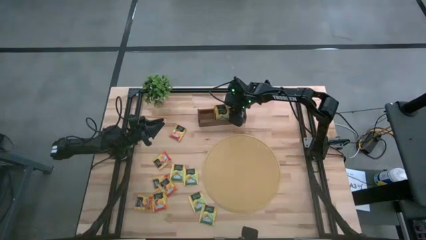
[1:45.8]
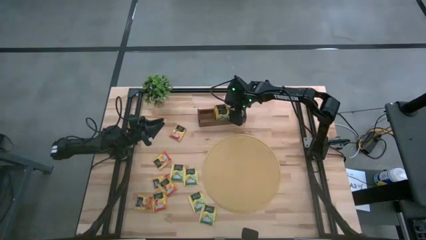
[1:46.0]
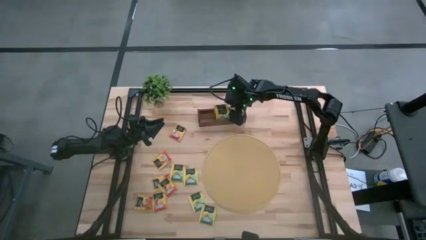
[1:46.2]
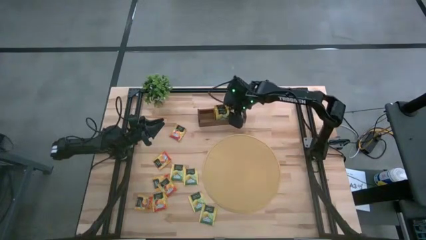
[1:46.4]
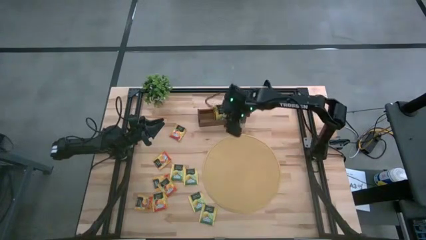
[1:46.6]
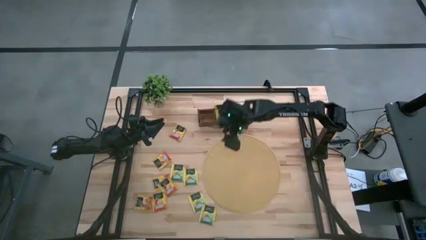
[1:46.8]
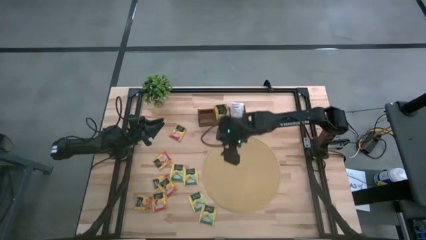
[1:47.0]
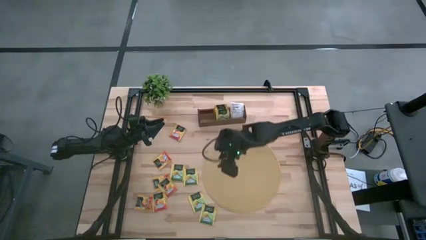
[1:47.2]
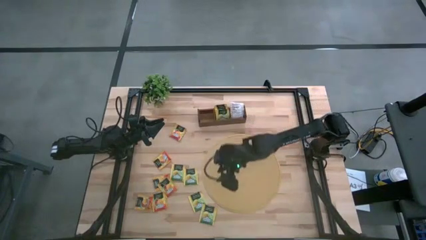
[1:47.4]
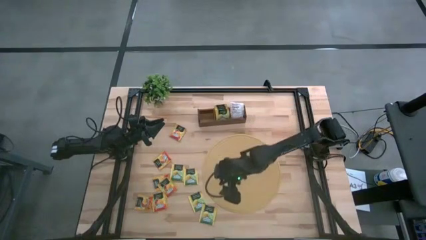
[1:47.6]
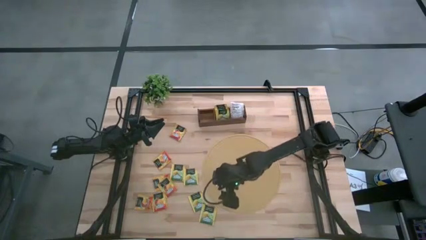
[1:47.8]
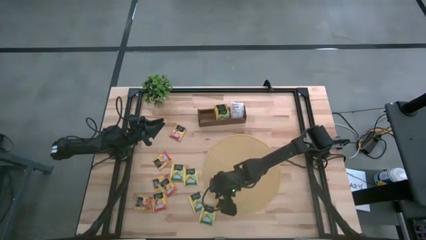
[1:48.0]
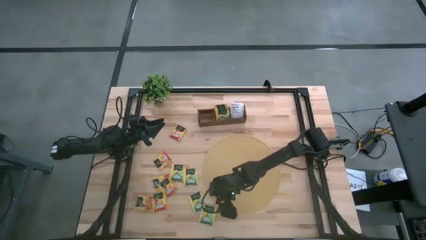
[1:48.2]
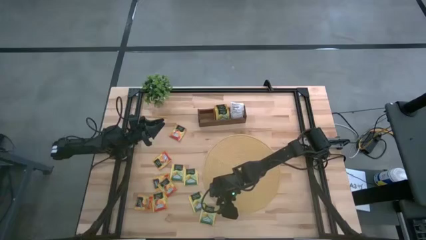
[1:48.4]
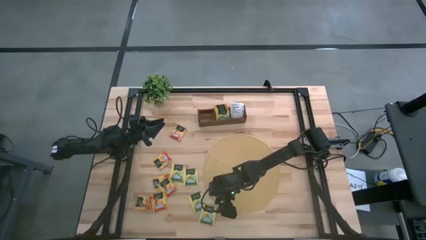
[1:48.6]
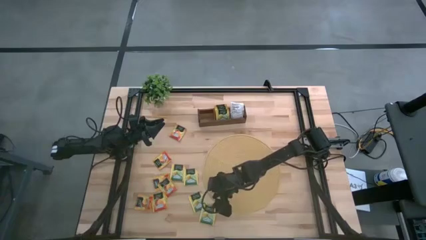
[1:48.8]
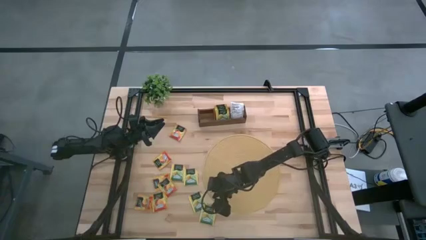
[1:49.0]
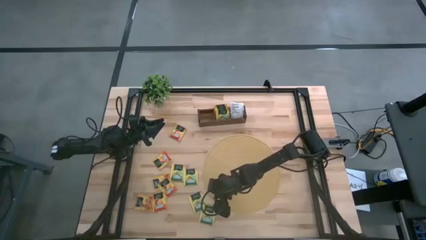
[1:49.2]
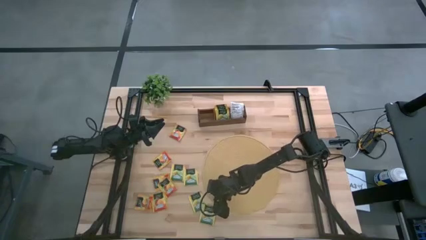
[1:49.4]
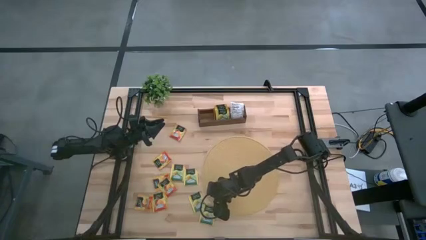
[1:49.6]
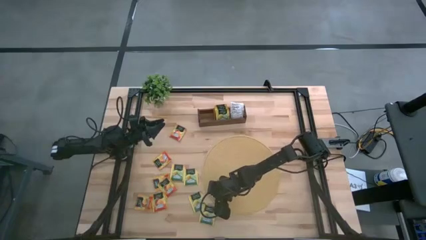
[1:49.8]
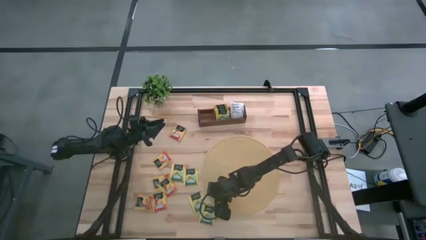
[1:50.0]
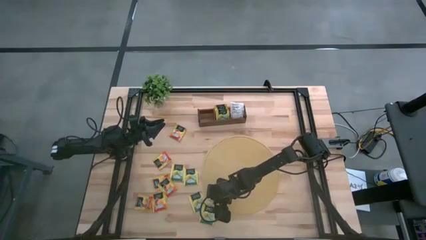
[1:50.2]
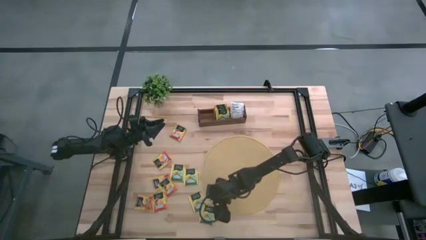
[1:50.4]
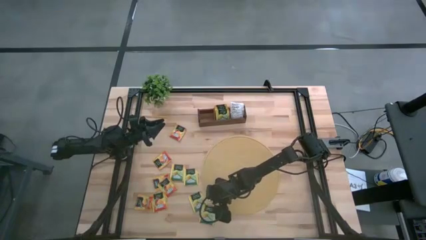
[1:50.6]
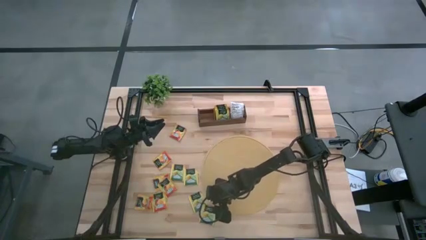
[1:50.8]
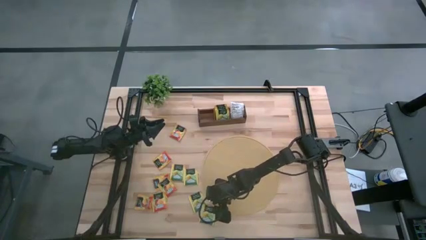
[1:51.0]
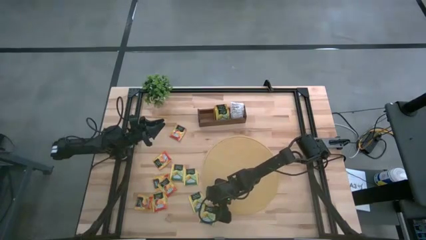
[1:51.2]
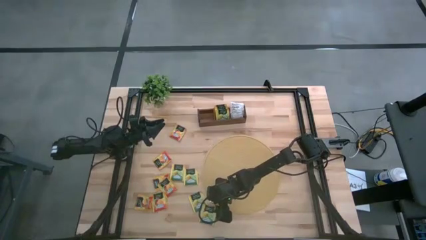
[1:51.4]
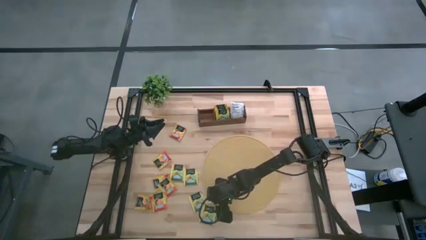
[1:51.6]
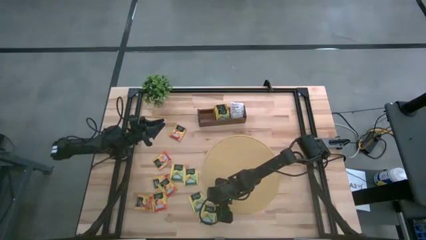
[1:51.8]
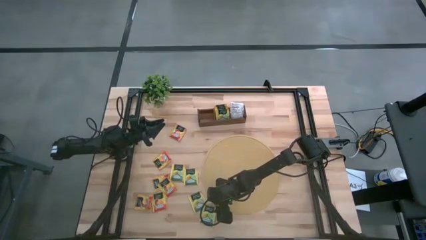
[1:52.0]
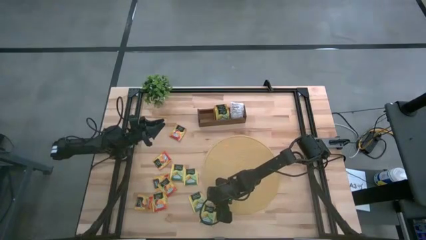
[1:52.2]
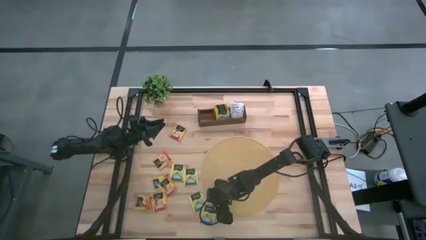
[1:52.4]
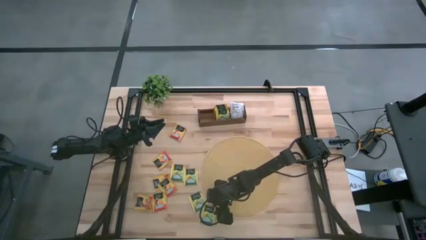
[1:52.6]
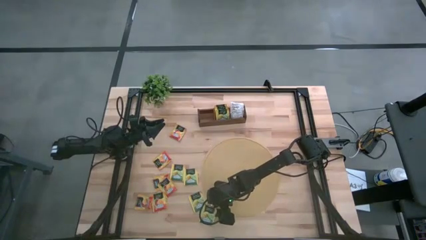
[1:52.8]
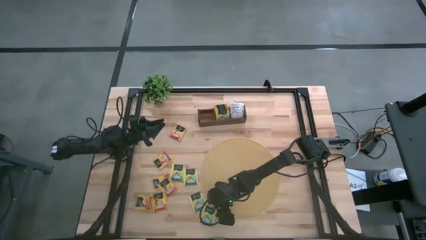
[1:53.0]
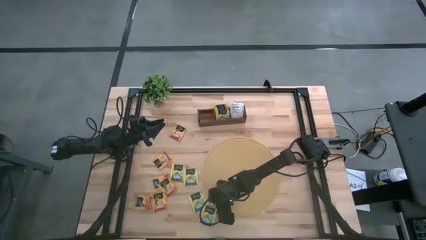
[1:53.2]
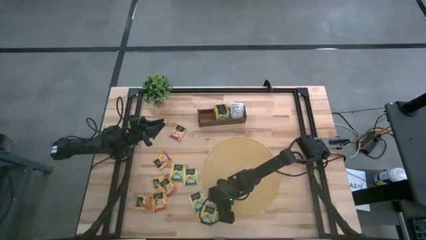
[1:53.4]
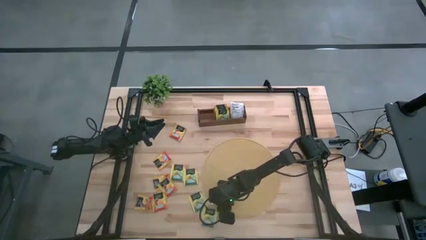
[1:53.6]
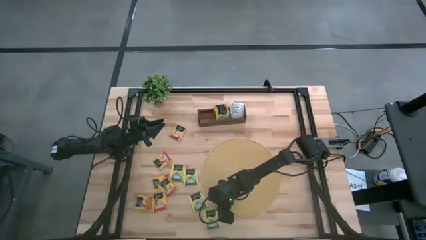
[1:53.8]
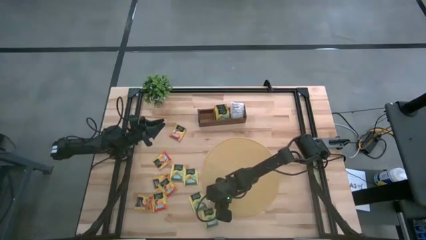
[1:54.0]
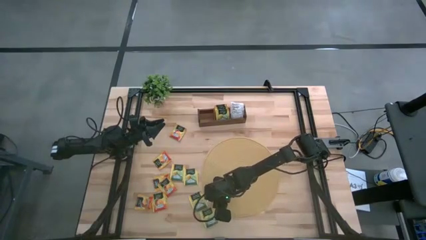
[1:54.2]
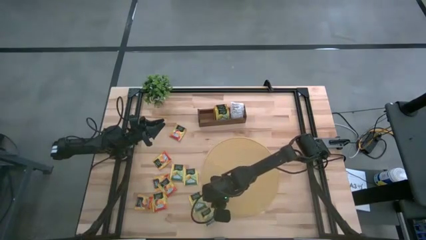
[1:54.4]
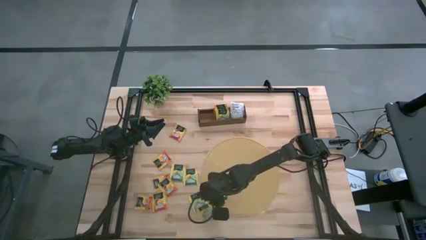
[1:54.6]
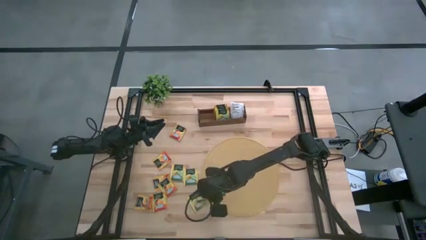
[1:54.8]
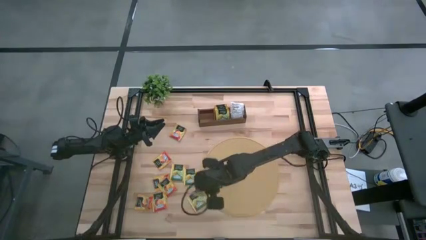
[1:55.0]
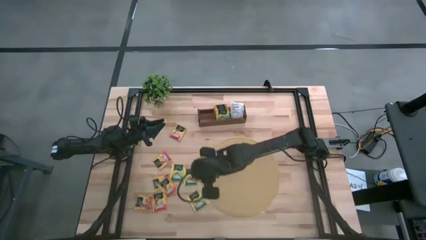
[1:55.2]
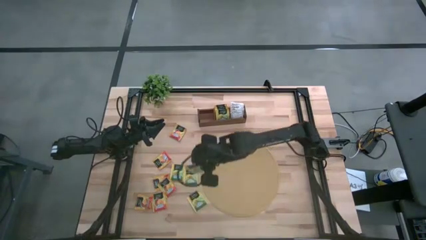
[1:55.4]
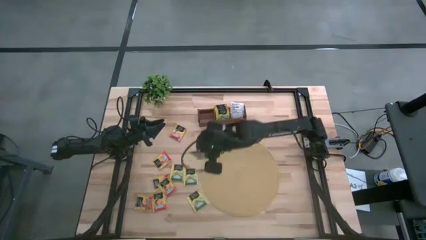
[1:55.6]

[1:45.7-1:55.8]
Task: Pick & Place Tea
Put the yellow tea bag into the middle section of the wooden organizer

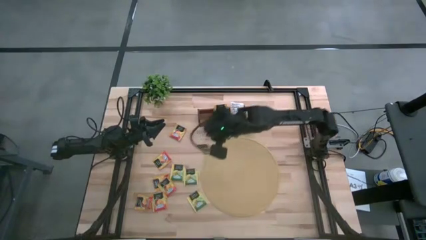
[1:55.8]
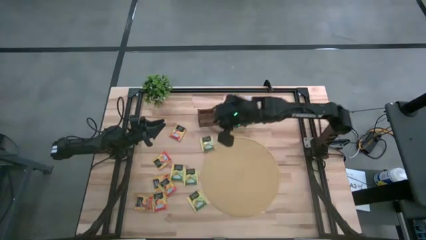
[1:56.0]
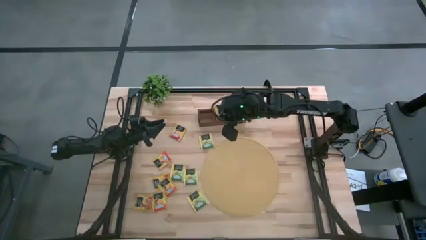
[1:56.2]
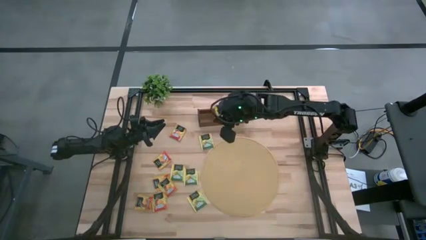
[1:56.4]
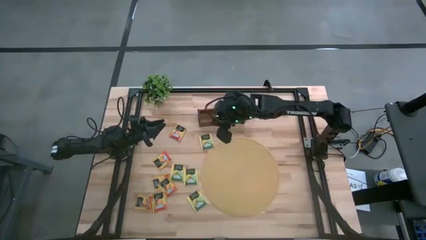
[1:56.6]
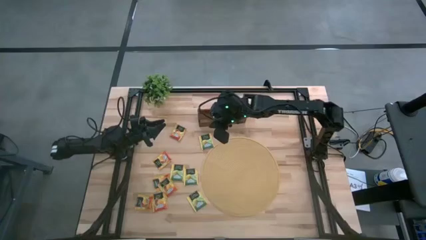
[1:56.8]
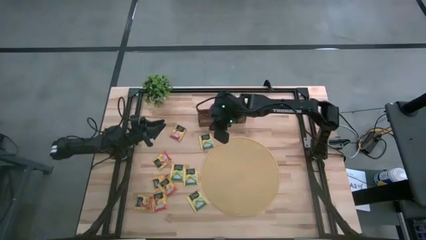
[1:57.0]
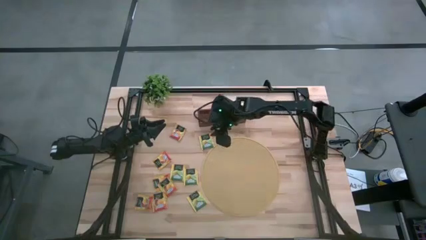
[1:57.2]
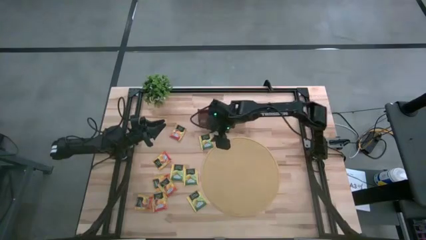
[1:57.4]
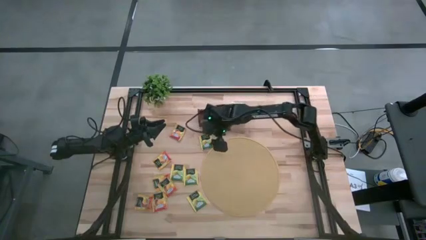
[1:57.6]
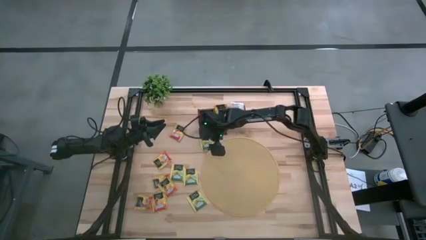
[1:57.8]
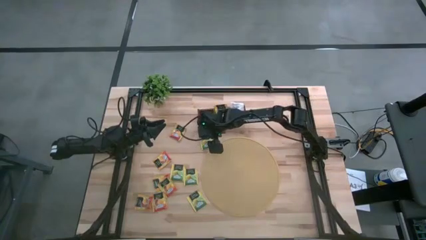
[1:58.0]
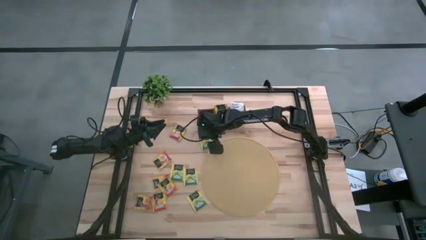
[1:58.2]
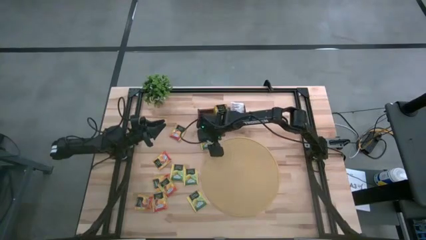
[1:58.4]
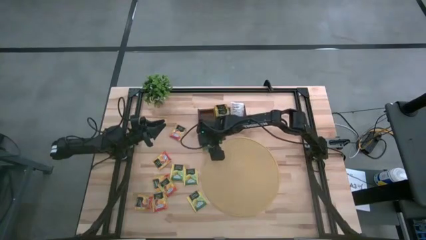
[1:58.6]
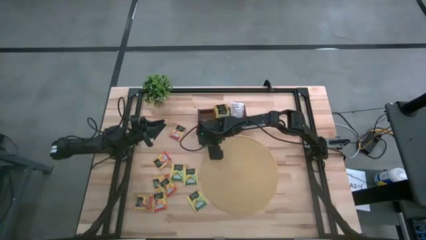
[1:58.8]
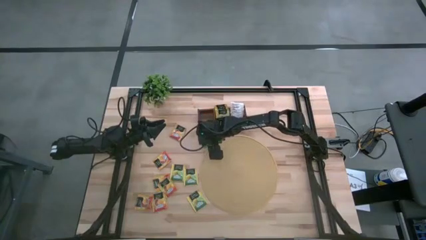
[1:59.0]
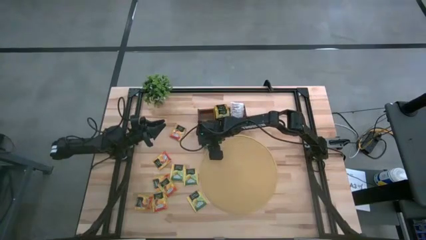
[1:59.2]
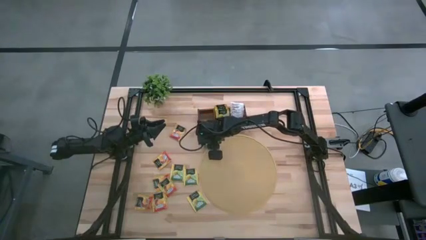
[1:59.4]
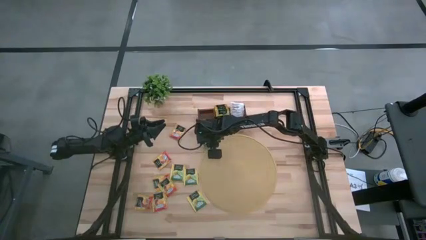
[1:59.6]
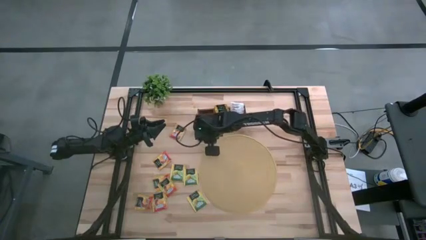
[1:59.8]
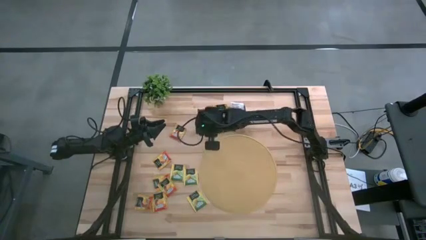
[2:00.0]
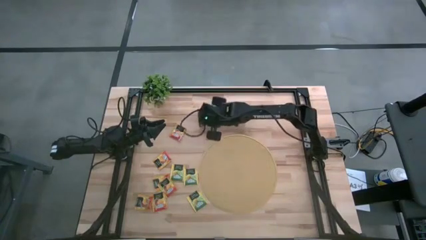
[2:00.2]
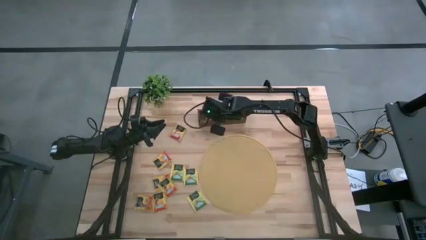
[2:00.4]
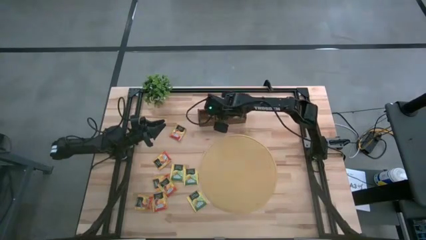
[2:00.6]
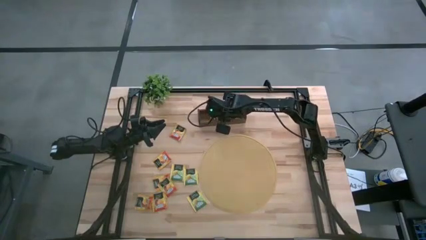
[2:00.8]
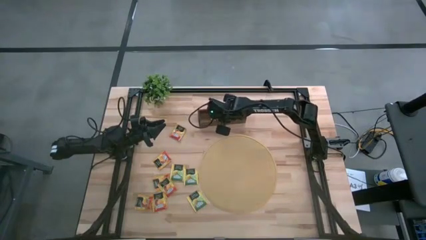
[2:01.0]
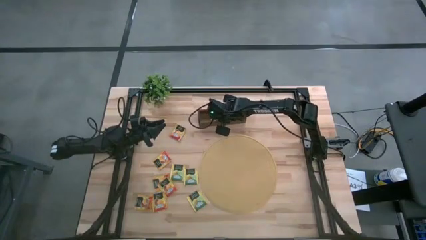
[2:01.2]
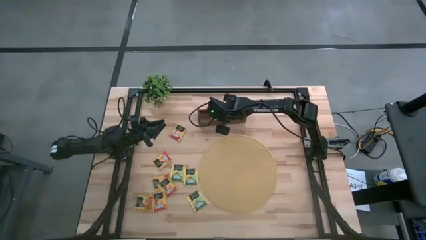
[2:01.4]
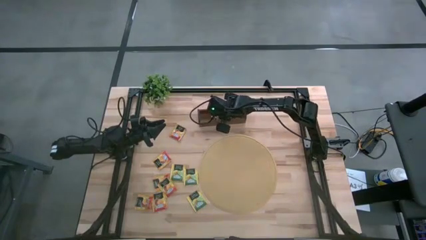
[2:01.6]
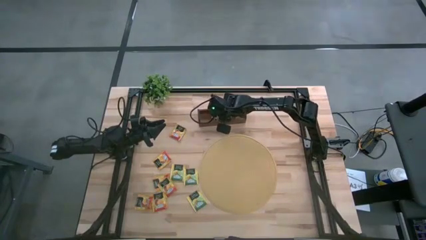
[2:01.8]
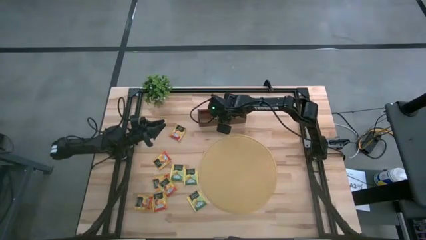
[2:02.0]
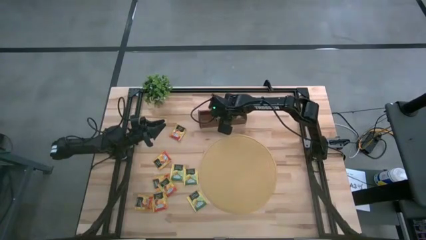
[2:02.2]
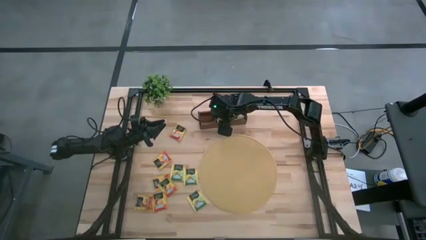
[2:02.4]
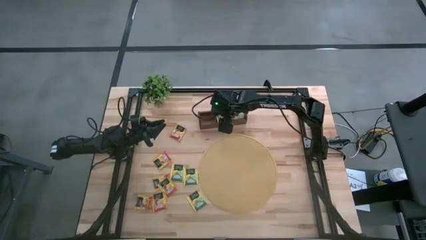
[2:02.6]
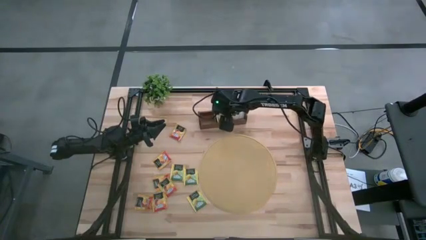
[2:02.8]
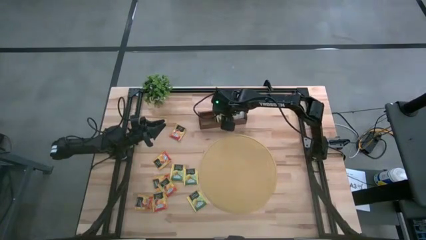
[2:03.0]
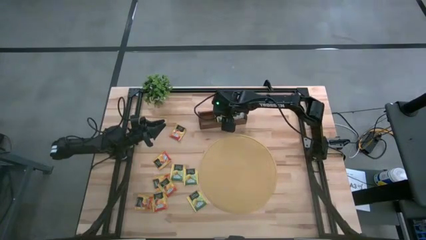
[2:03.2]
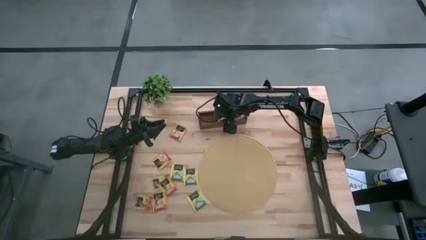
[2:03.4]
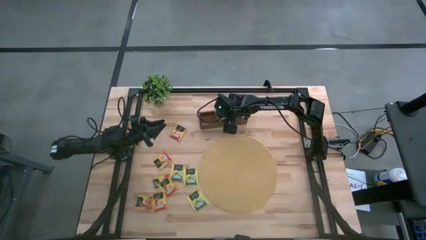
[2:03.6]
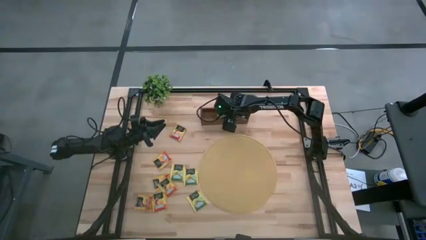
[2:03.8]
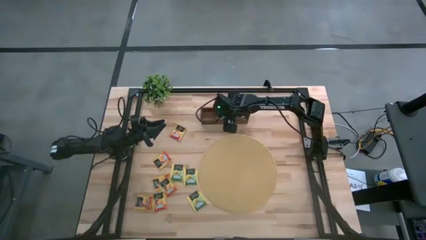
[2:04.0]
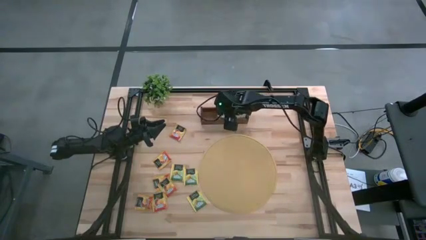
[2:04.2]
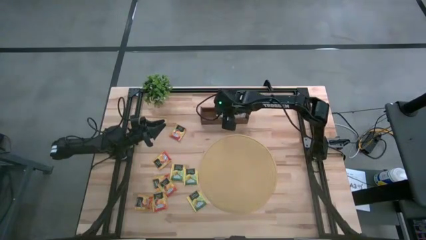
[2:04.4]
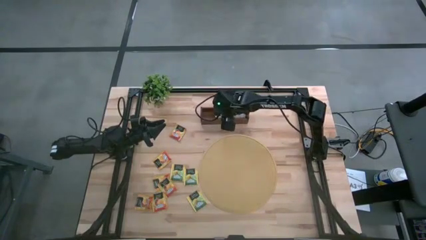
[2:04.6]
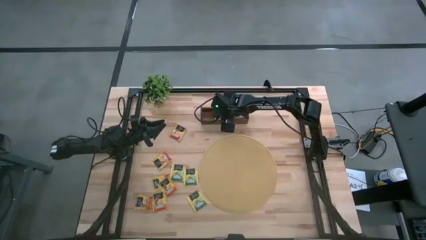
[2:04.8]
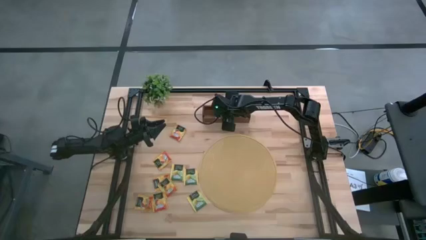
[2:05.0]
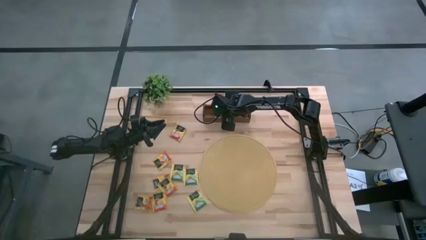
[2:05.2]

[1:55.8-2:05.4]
Put the yellow tea bag into the middle section of the wooden organizer
